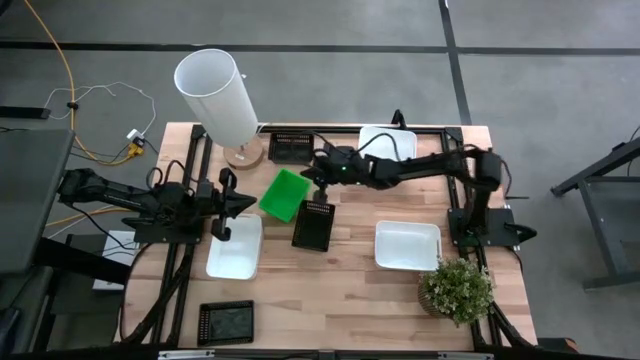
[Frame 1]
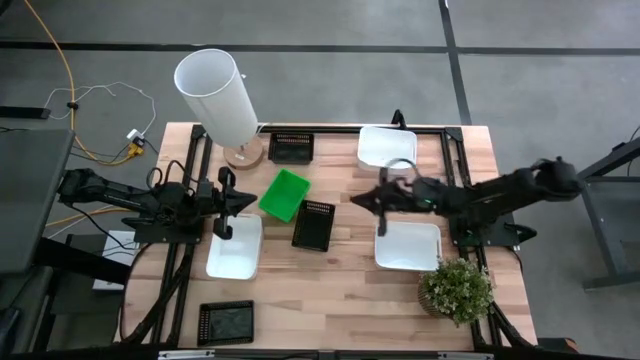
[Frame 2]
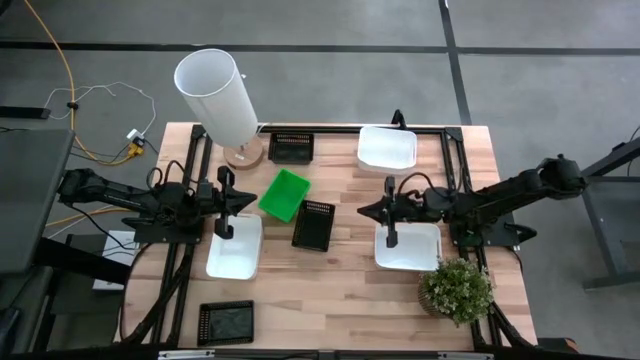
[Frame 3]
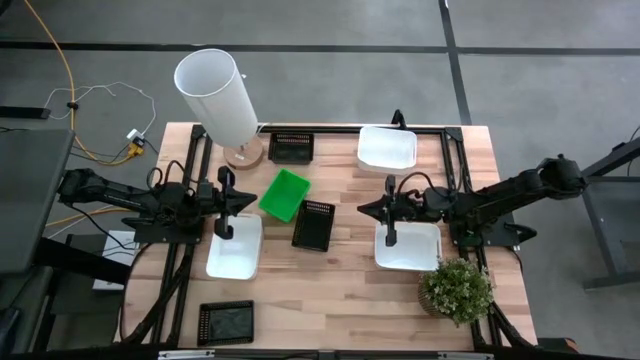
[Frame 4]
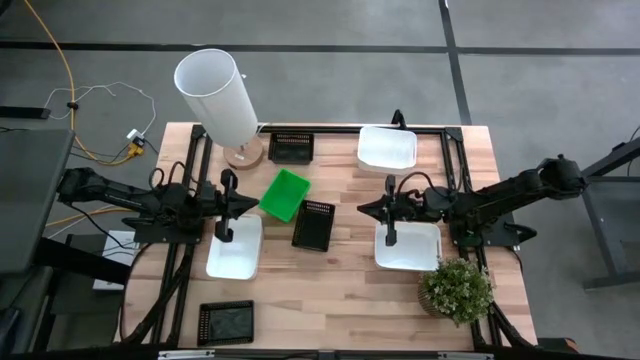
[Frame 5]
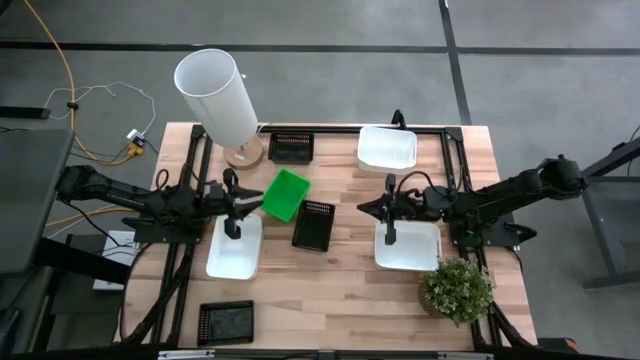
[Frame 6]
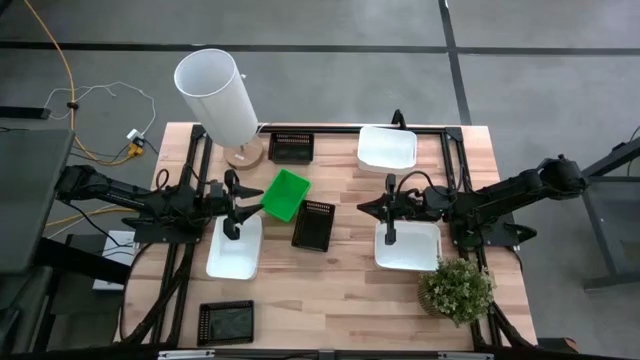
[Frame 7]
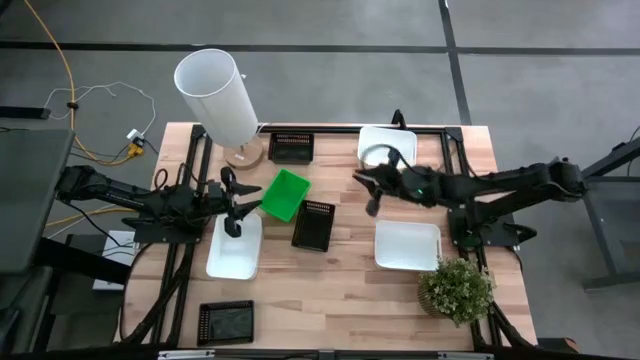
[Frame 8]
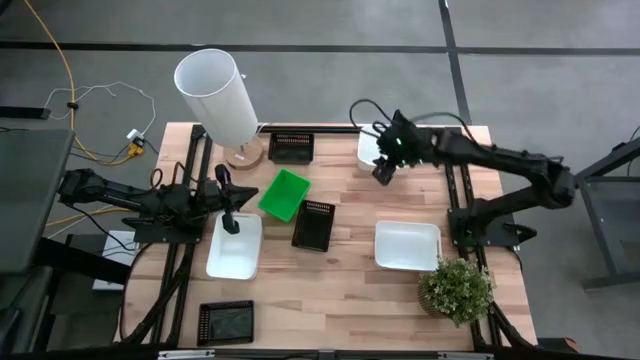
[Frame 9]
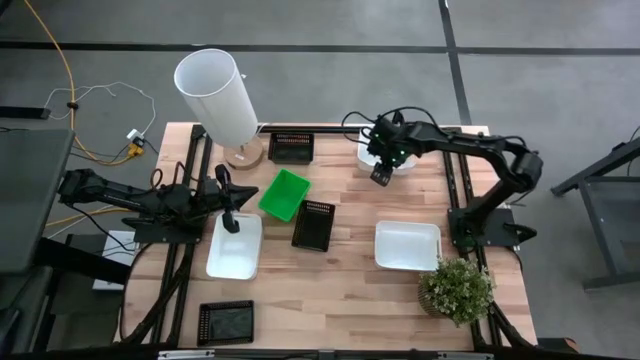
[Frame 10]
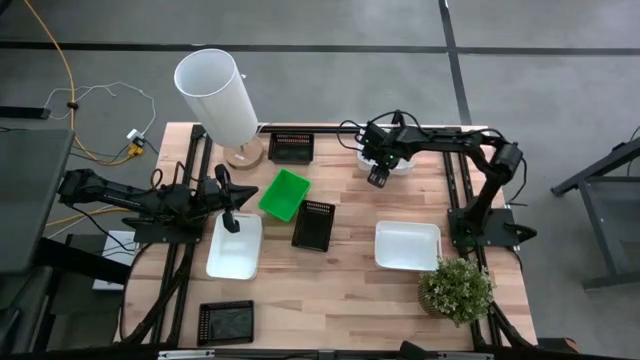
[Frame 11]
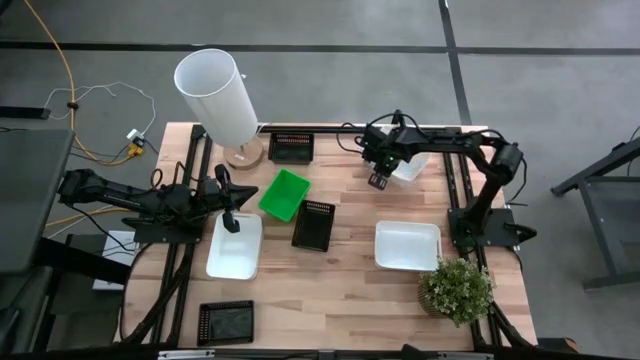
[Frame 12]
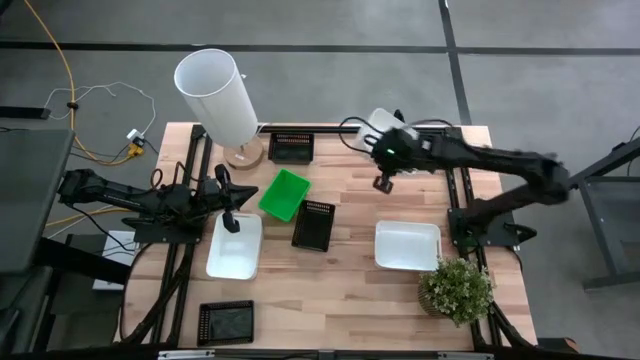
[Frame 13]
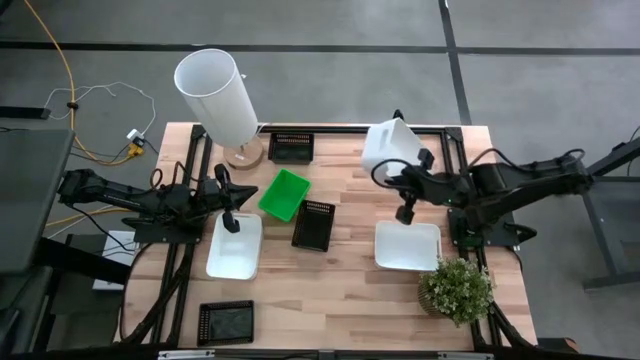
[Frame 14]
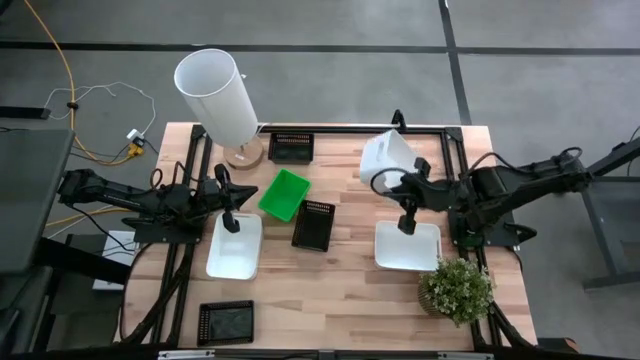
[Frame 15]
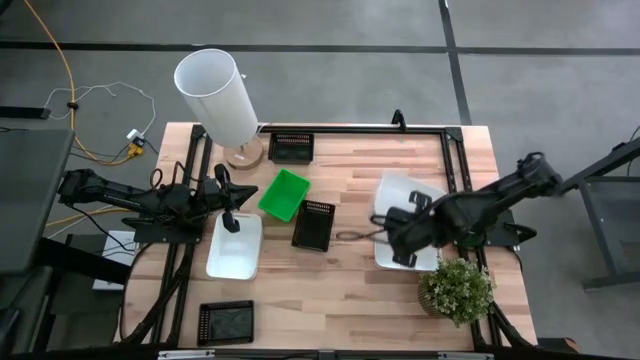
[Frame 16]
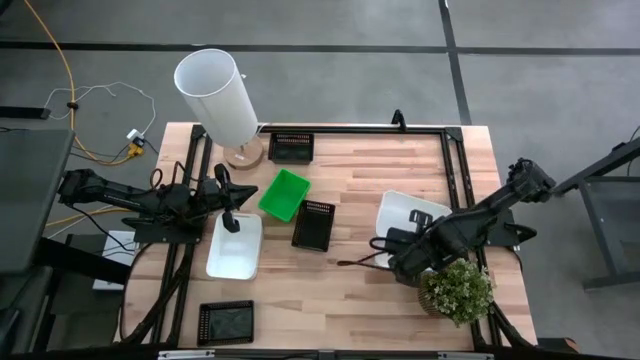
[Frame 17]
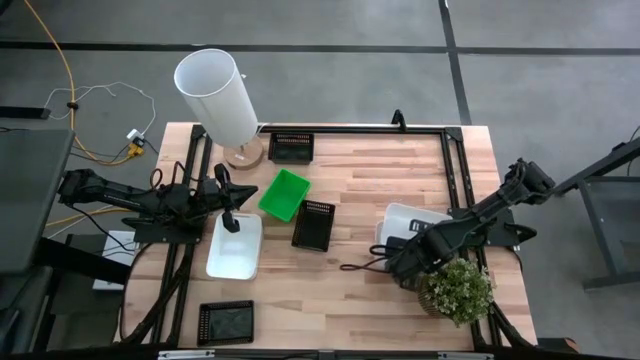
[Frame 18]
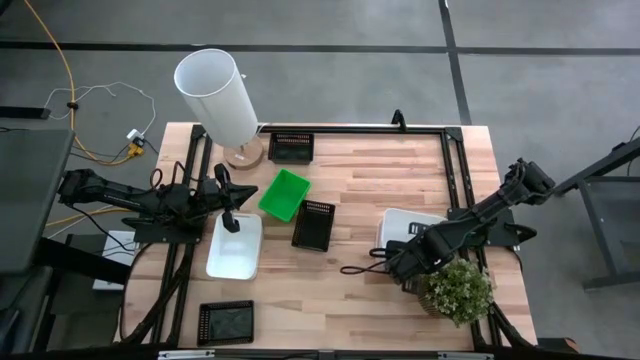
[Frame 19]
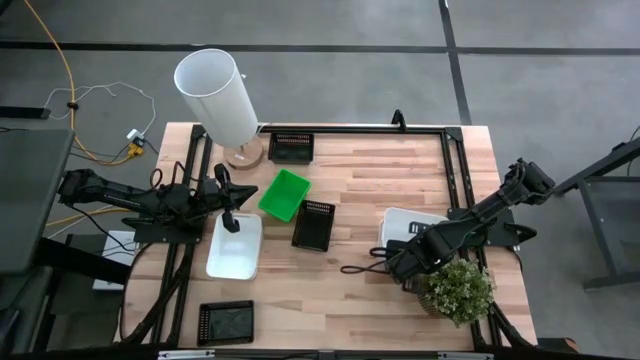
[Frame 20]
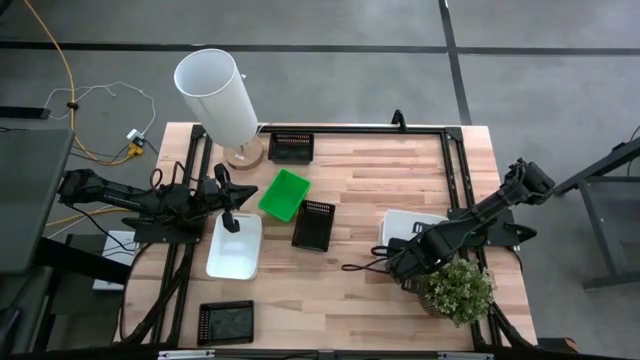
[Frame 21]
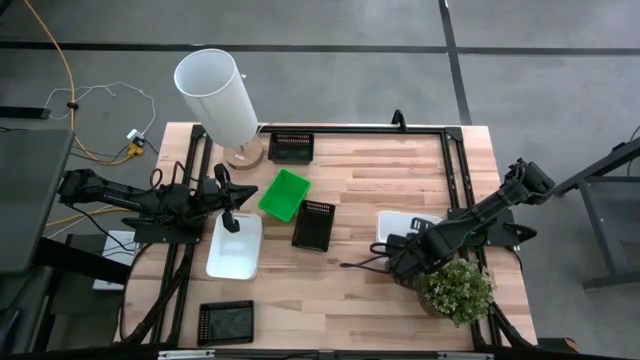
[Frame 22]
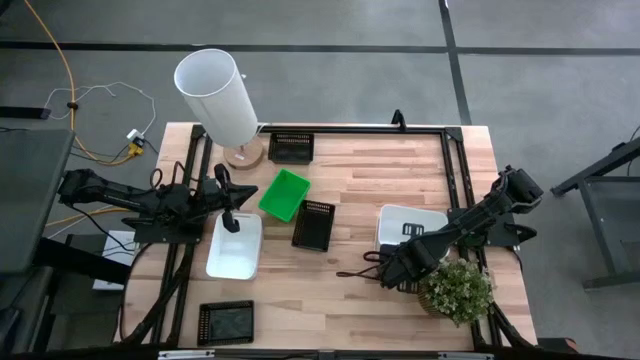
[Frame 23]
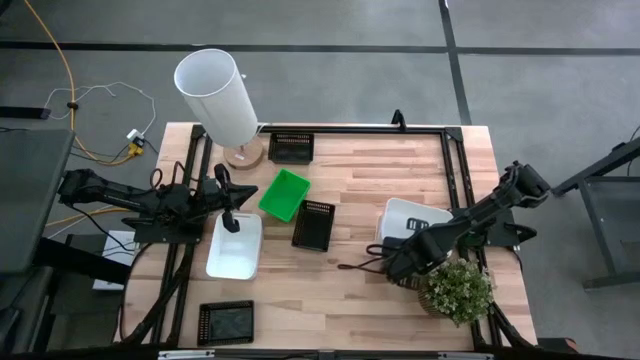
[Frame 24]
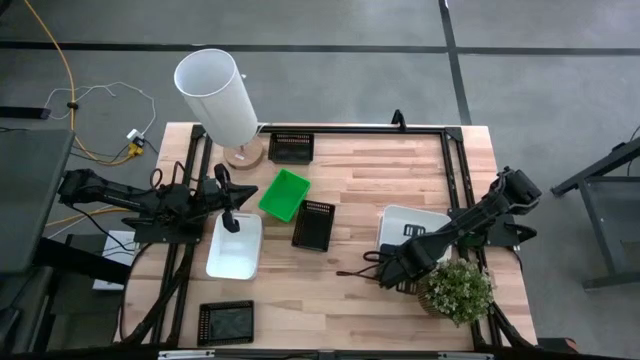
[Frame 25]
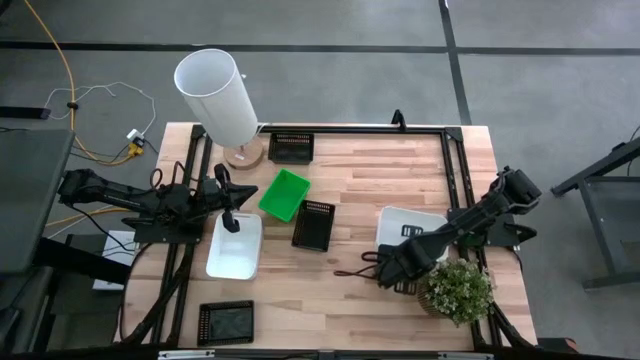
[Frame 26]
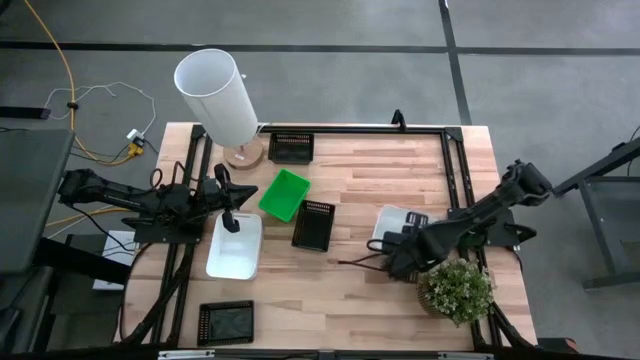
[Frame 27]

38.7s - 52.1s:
Stack the top white bin on the bottom right white bin
